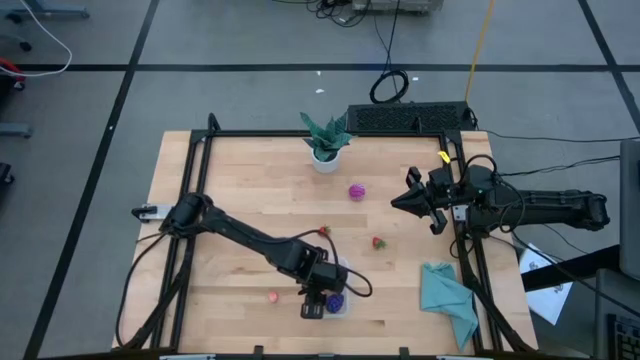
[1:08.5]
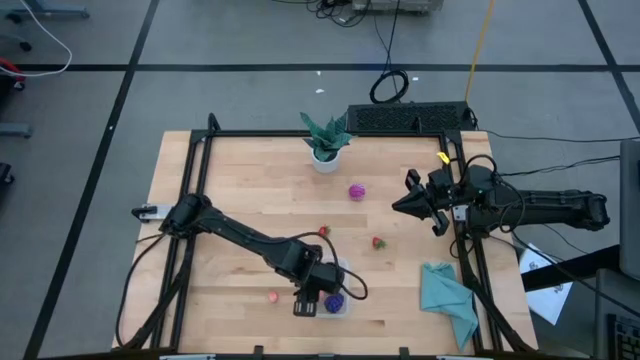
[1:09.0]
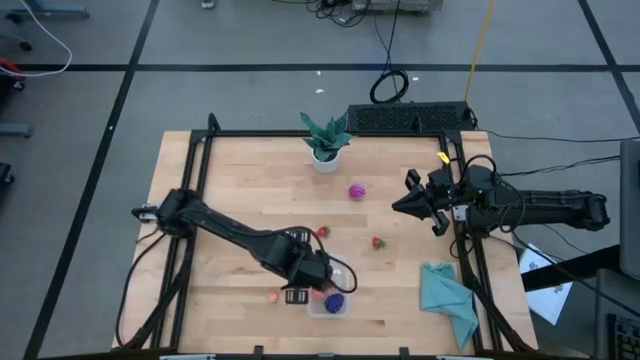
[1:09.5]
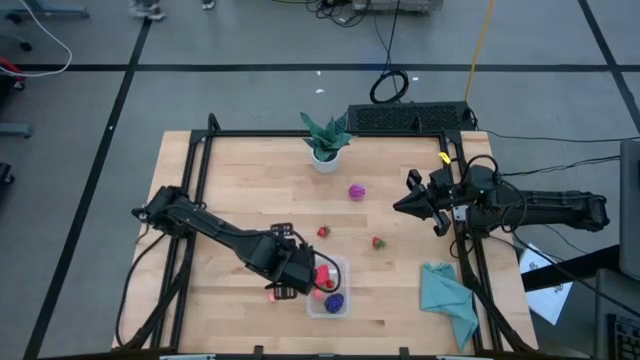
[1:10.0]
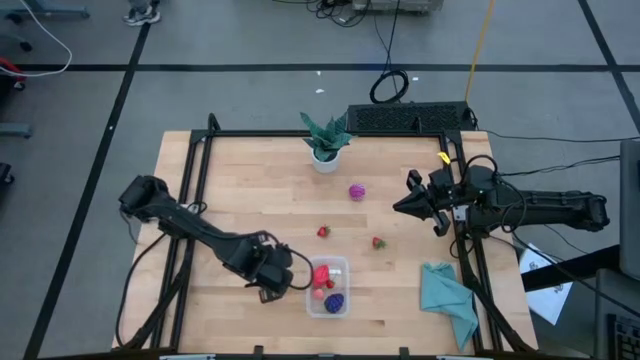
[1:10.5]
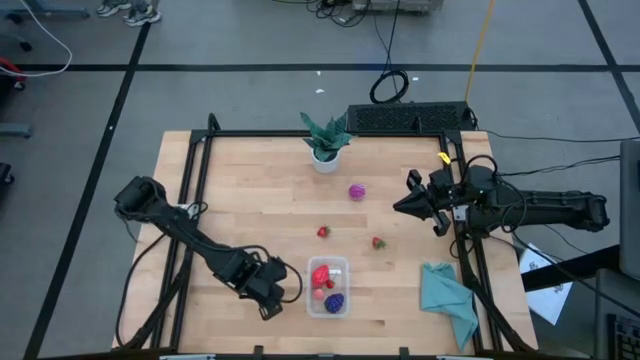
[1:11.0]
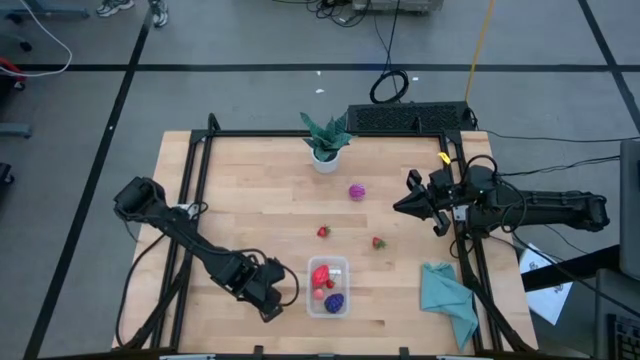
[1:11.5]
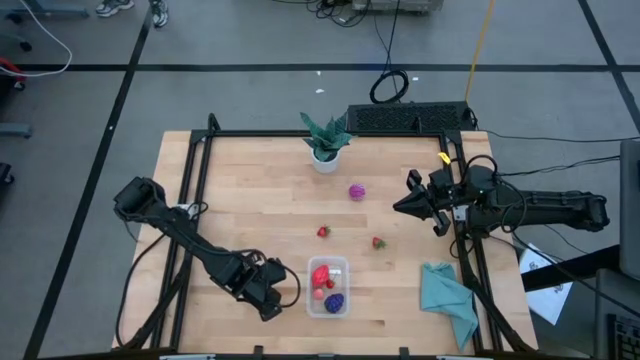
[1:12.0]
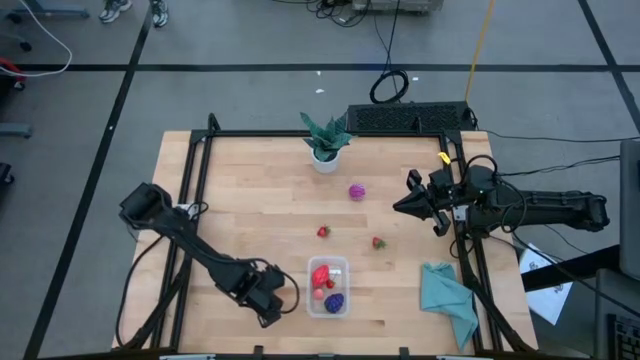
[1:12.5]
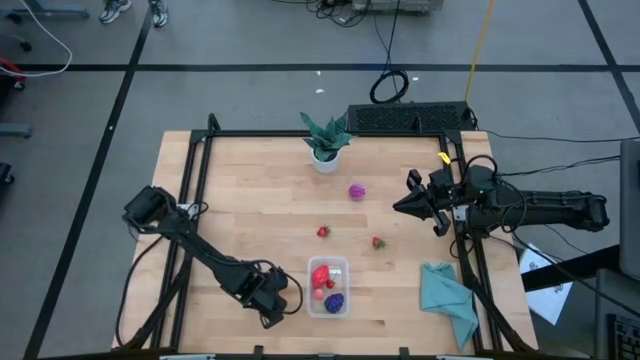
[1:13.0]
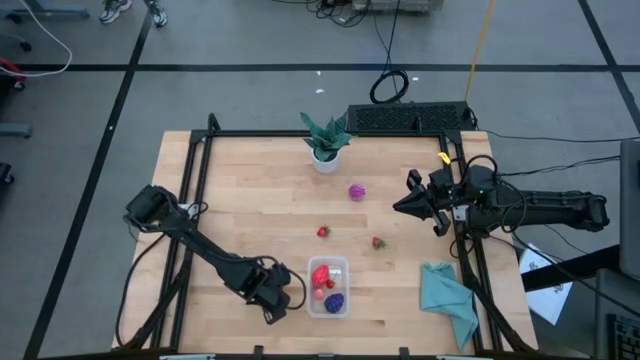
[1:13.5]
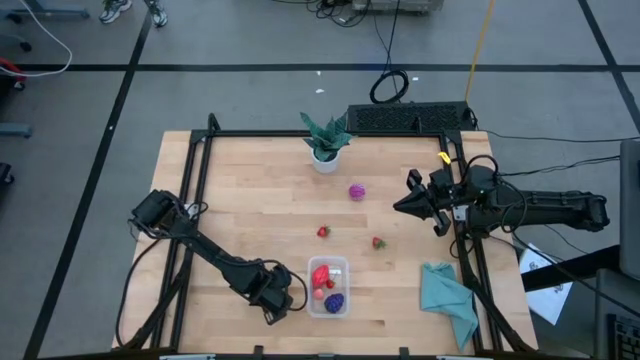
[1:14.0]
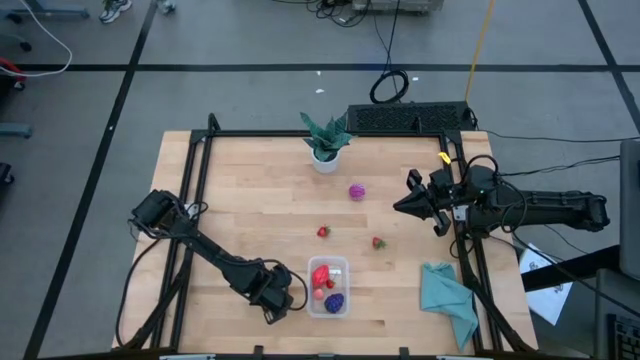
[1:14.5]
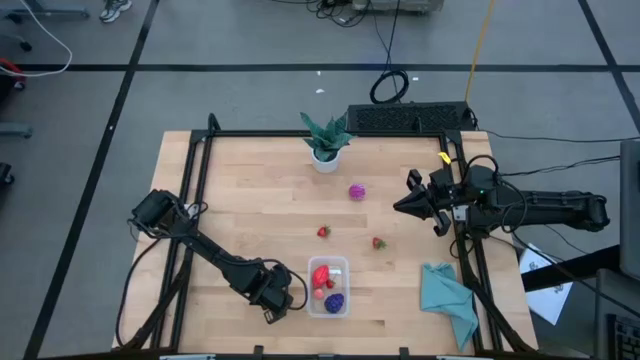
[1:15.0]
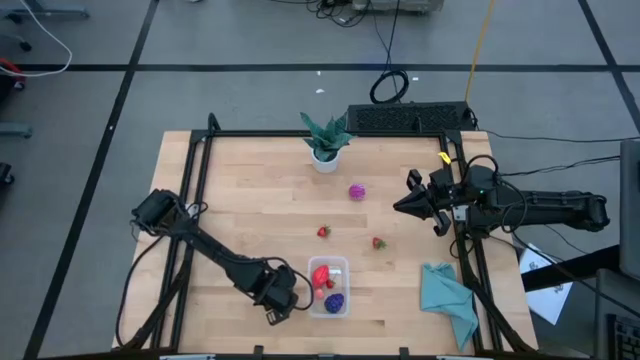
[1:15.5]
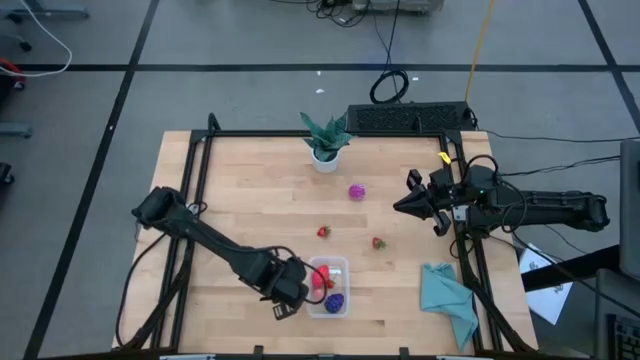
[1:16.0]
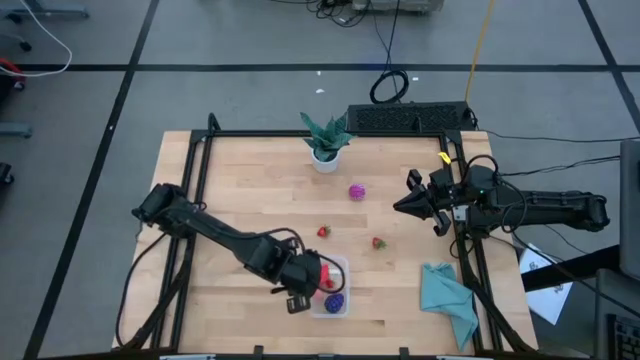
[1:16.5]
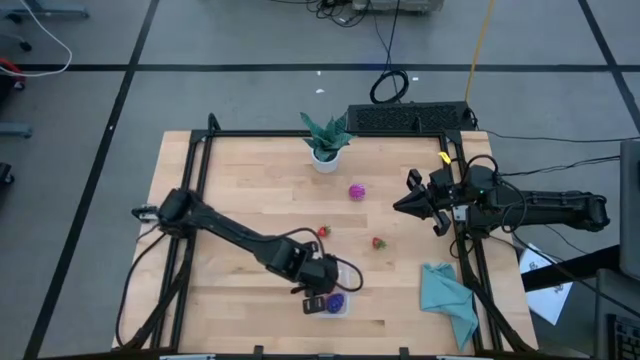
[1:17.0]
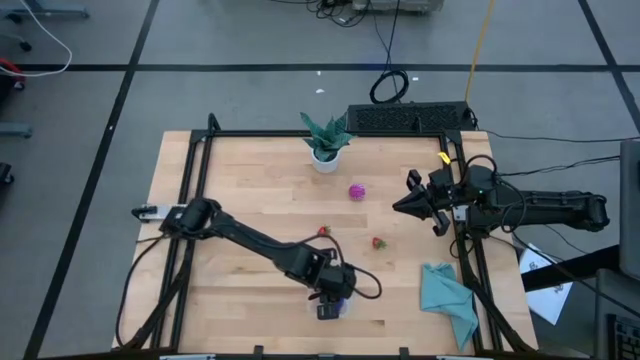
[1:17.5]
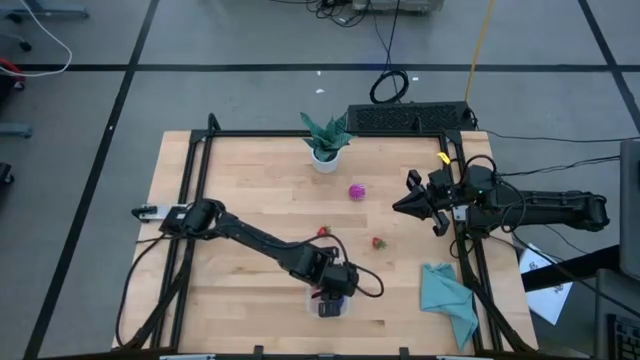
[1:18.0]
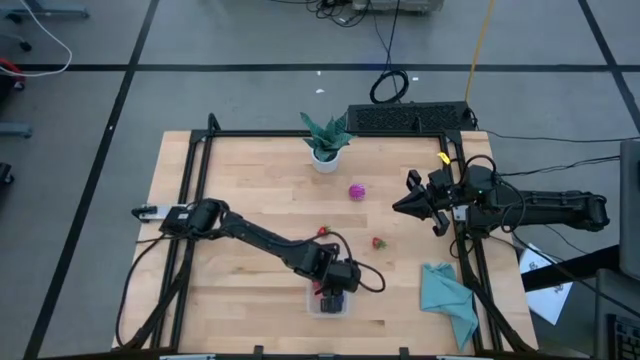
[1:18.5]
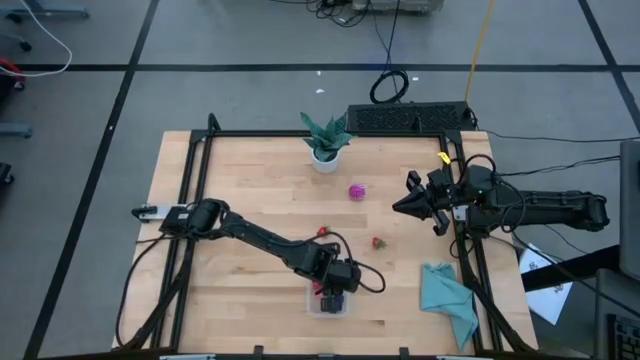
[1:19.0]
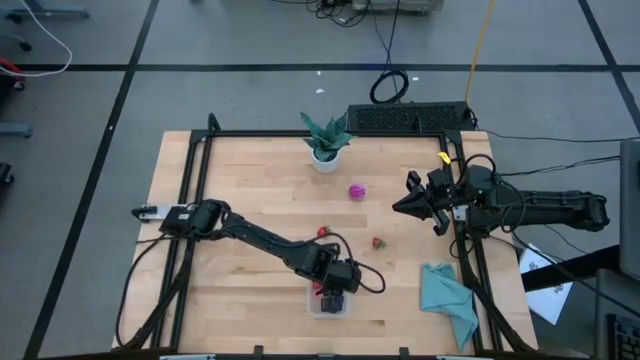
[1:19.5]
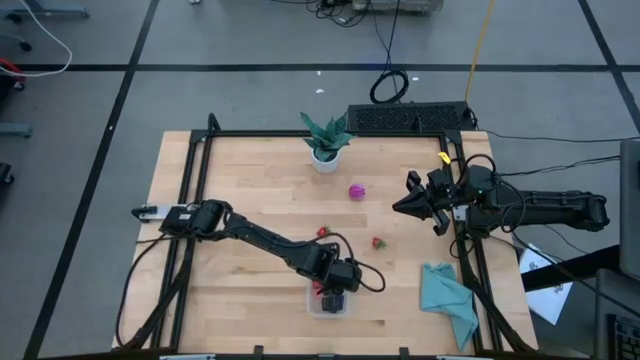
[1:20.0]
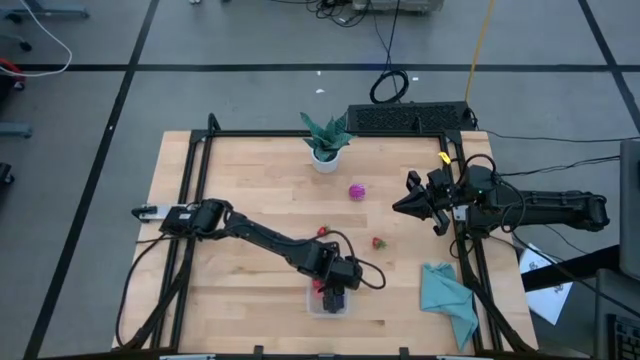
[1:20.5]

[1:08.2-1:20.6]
Task: Pick and placing Produce into tupperware
Put the pink peach into the transparent container

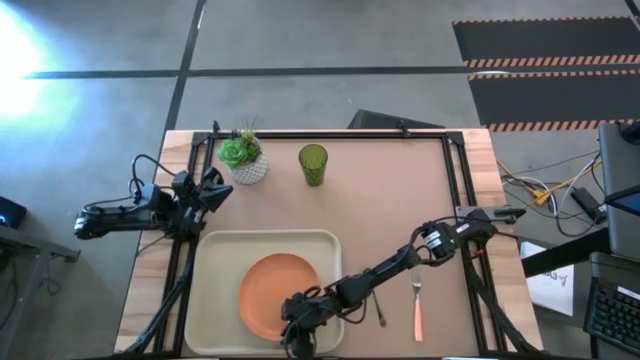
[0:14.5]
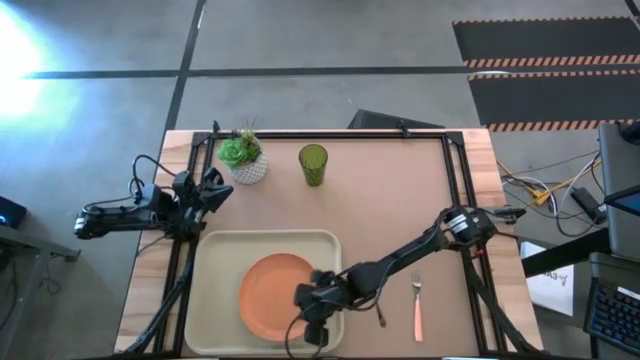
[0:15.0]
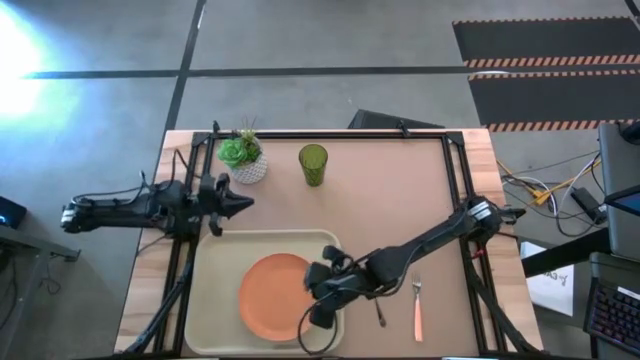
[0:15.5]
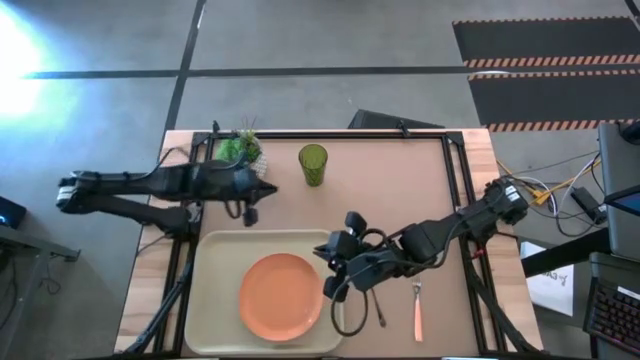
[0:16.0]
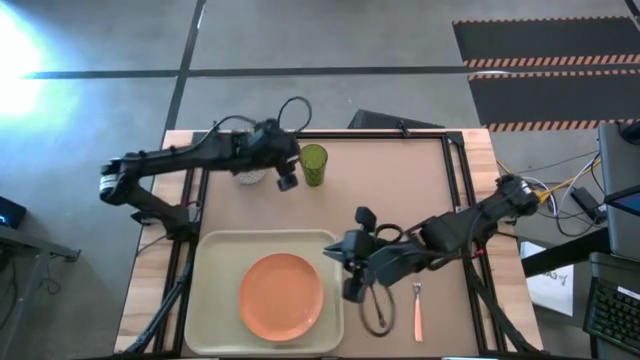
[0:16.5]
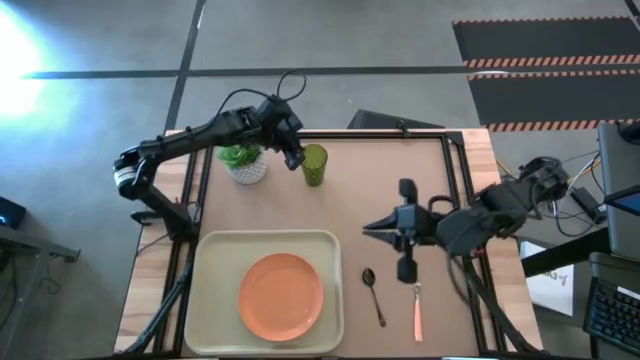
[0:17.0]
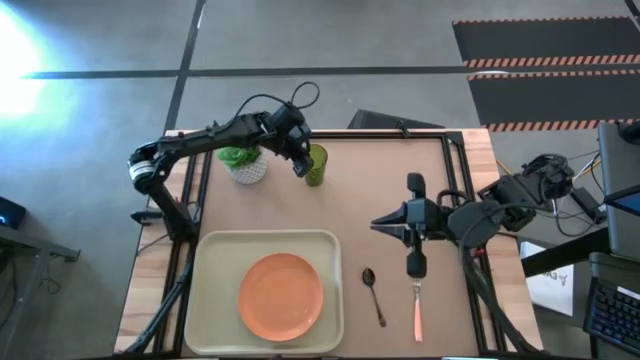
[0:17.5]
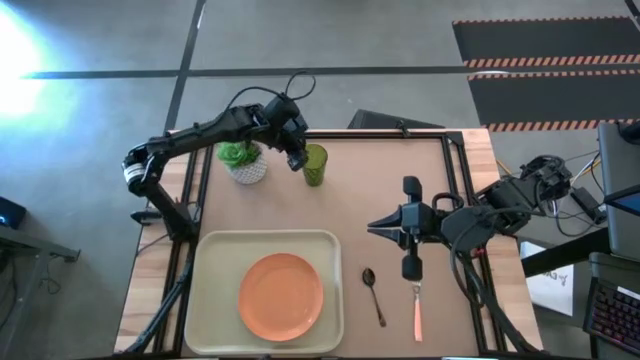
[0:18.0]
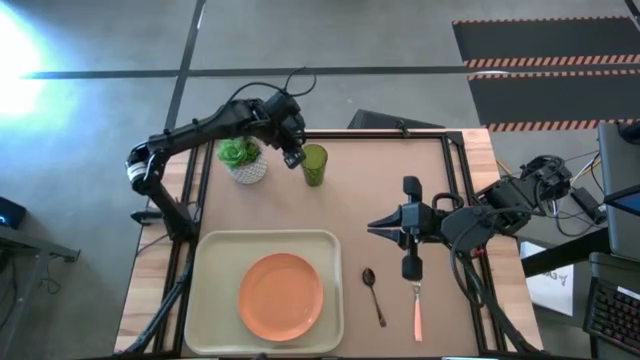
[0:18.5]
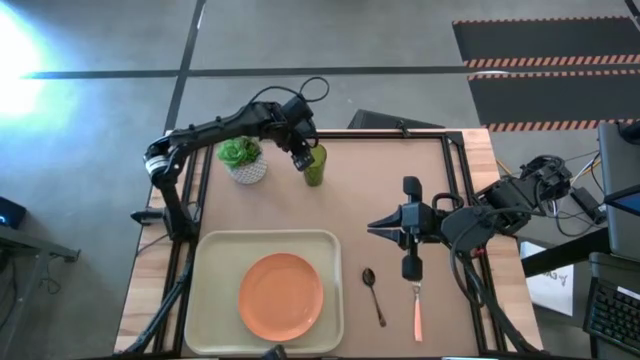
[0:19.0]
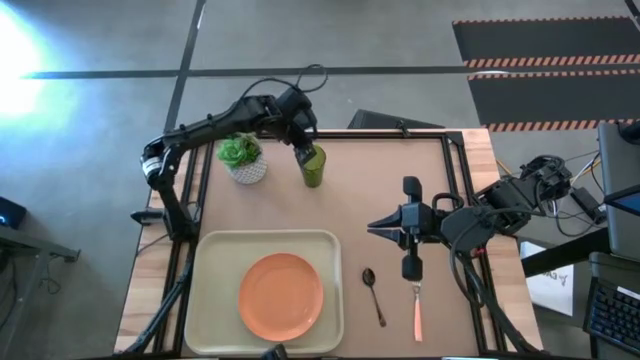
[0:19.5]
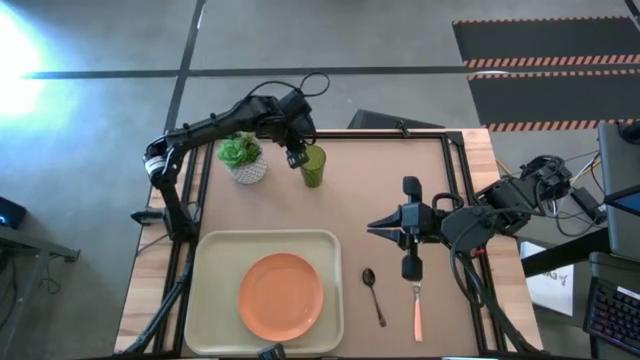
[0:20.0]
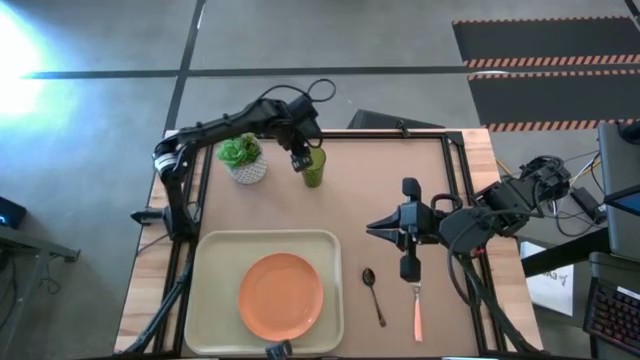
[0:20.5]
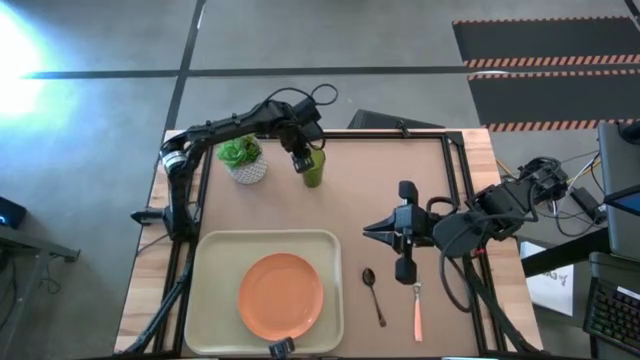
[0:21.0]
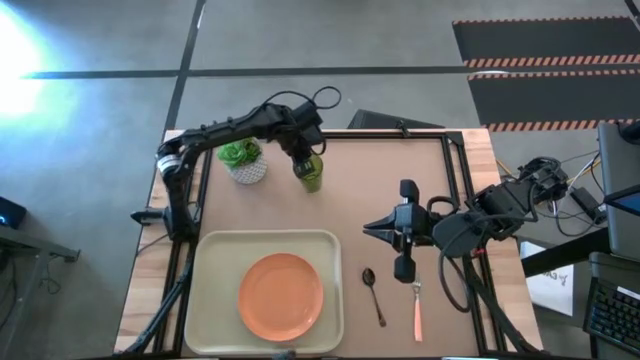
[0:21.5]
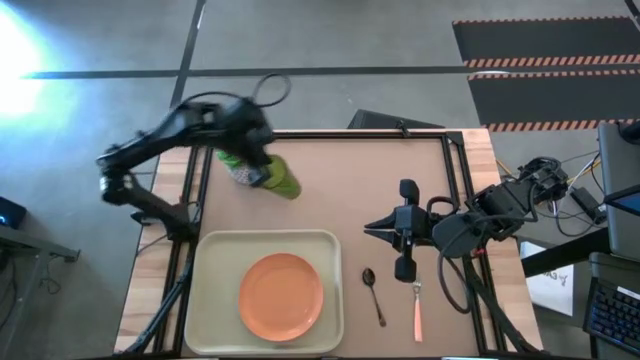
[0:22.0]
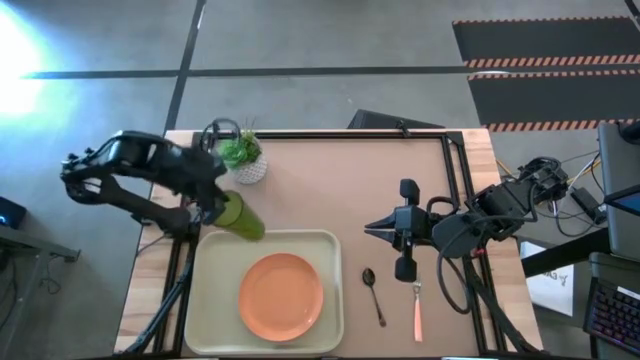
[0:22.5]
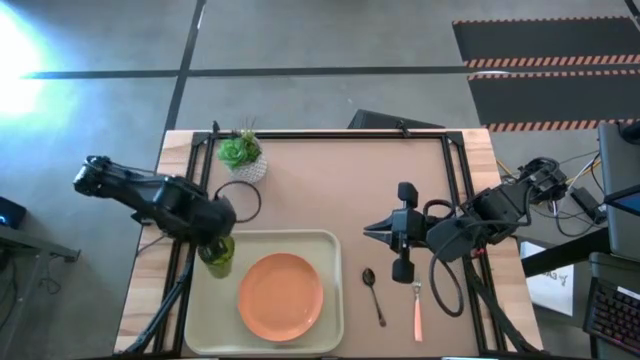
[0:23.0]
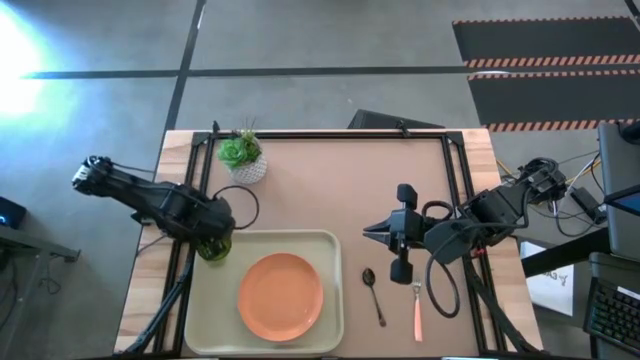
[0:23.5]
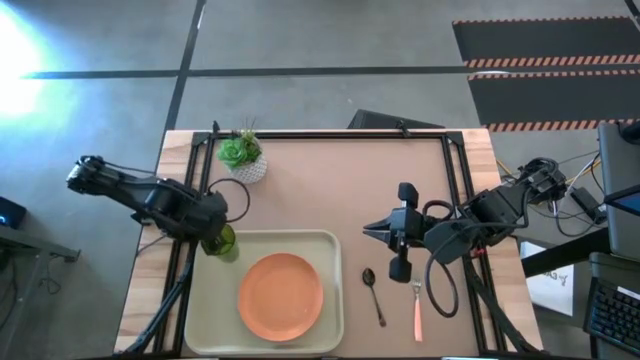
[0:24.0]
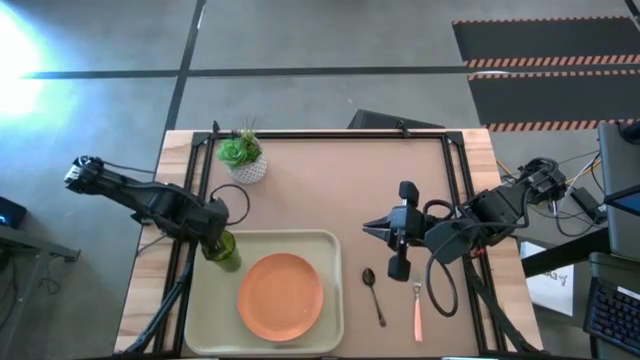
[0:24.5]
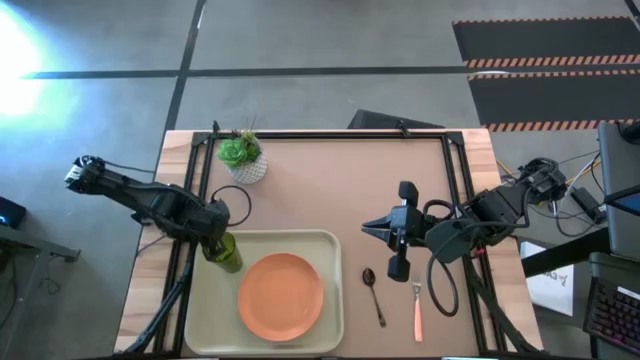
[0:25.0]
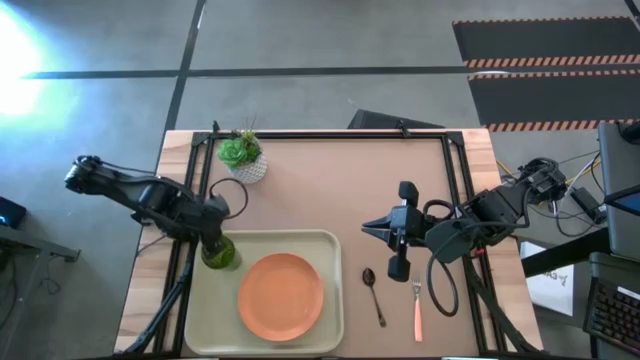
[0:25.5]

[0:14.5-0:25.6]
Task: Pick and place plate/cup/fork/spoon on tray
Put the green cup on the white tray to the top left of the orange plate
